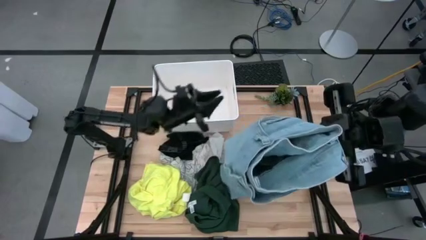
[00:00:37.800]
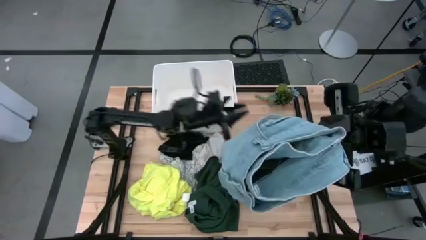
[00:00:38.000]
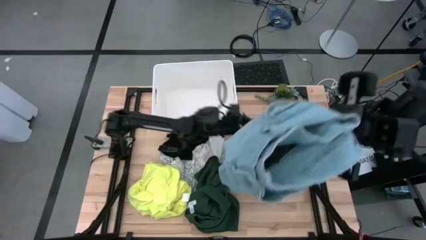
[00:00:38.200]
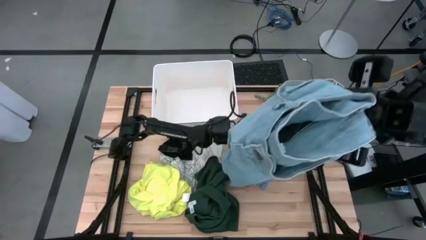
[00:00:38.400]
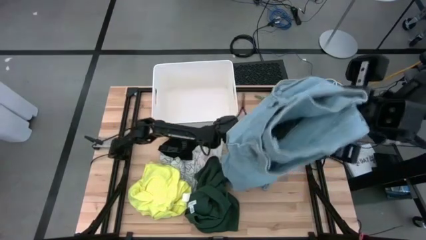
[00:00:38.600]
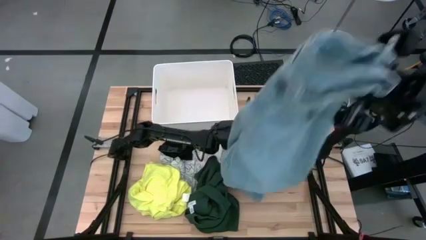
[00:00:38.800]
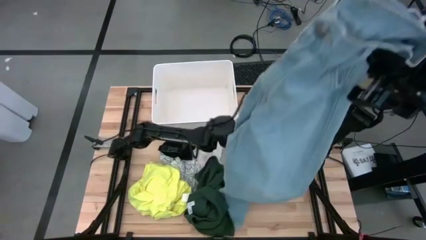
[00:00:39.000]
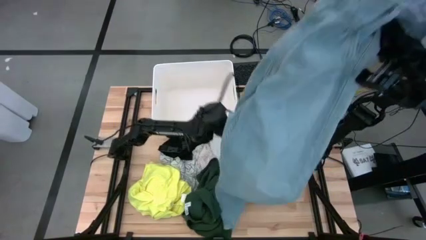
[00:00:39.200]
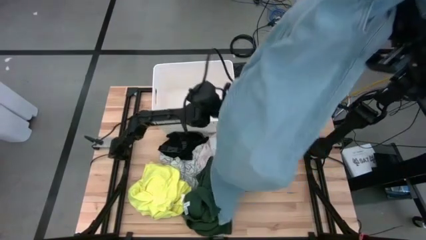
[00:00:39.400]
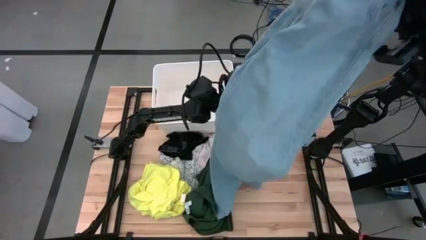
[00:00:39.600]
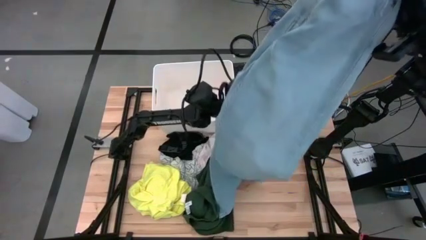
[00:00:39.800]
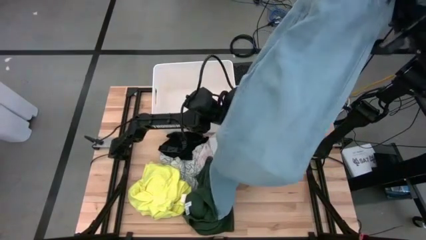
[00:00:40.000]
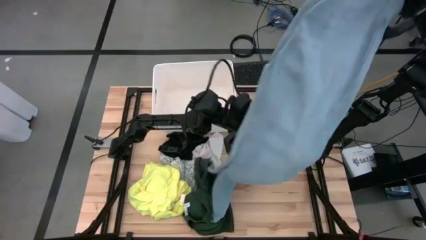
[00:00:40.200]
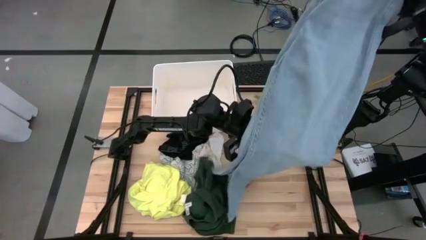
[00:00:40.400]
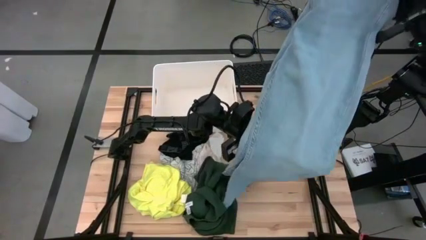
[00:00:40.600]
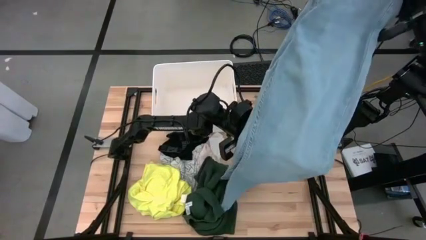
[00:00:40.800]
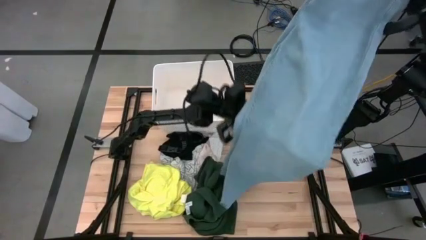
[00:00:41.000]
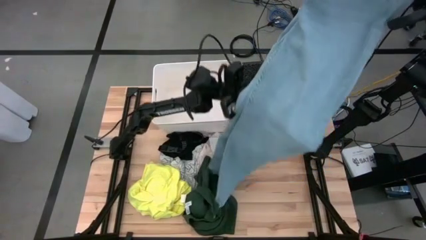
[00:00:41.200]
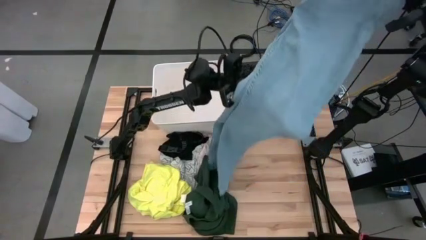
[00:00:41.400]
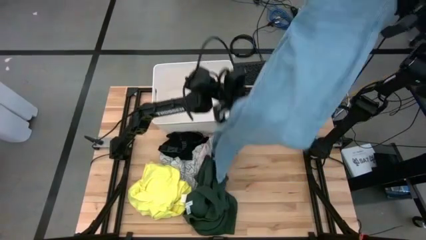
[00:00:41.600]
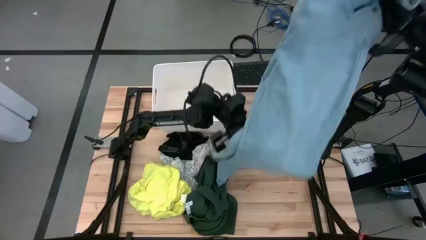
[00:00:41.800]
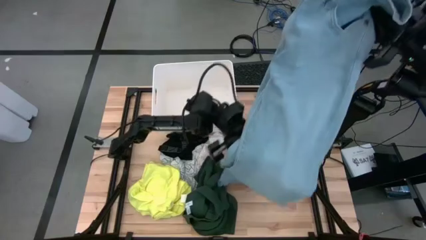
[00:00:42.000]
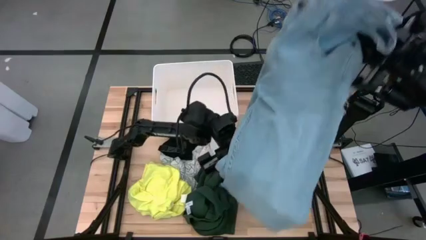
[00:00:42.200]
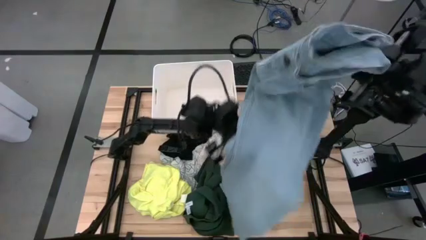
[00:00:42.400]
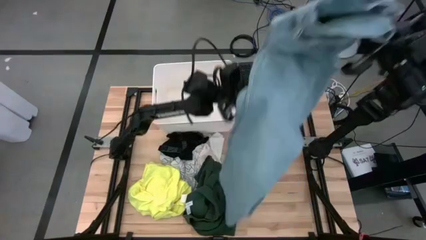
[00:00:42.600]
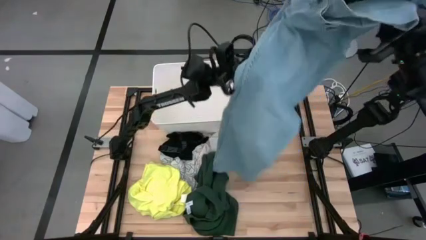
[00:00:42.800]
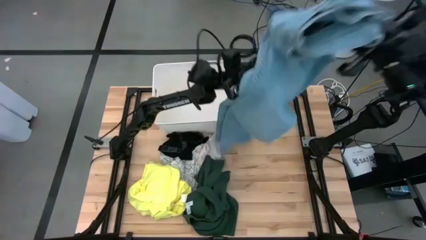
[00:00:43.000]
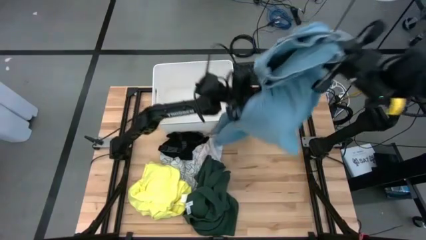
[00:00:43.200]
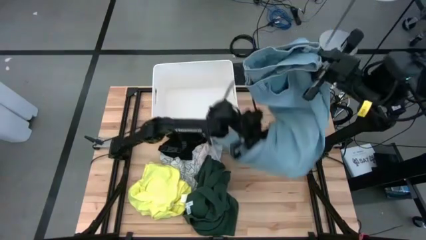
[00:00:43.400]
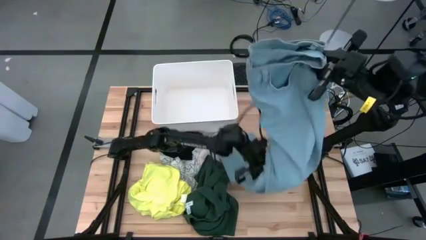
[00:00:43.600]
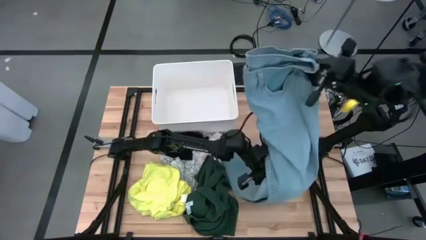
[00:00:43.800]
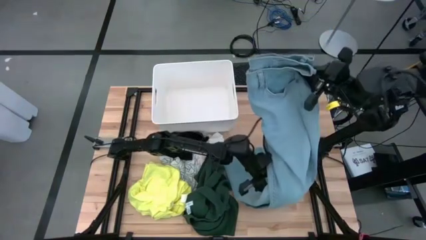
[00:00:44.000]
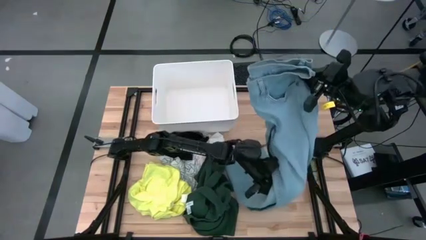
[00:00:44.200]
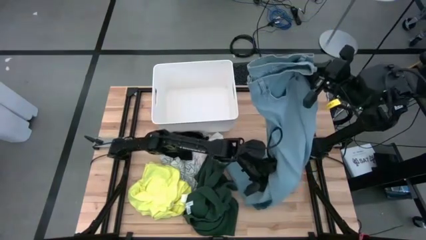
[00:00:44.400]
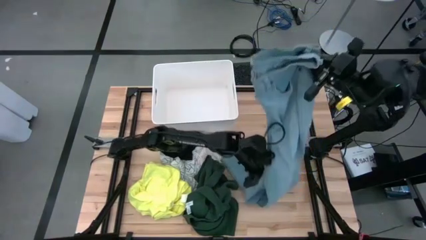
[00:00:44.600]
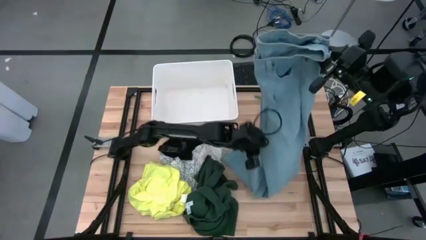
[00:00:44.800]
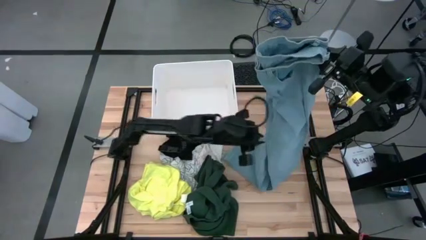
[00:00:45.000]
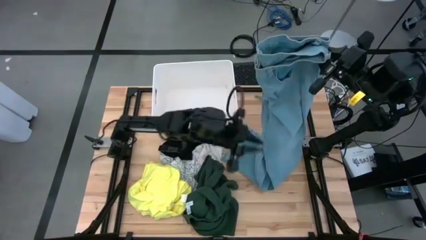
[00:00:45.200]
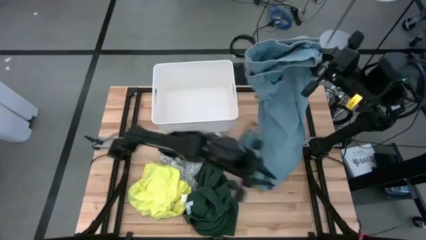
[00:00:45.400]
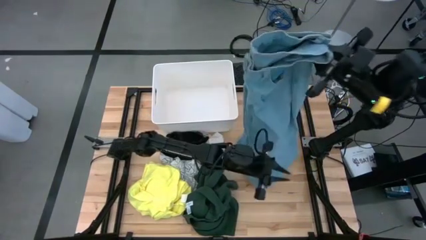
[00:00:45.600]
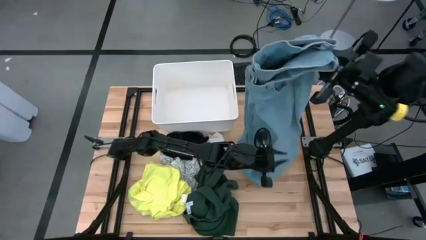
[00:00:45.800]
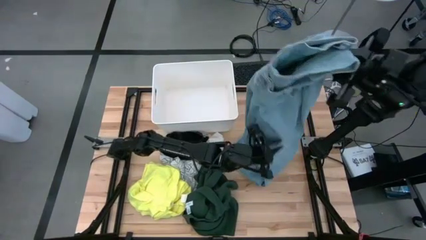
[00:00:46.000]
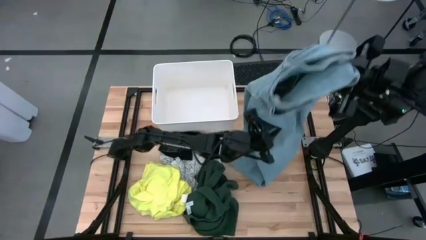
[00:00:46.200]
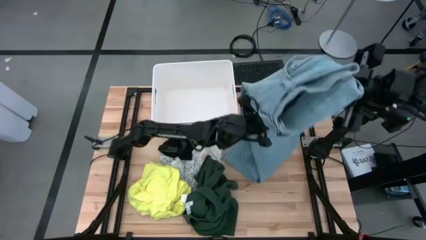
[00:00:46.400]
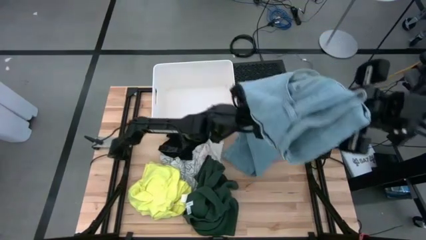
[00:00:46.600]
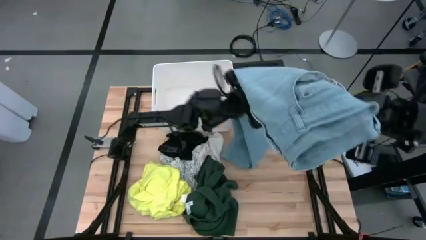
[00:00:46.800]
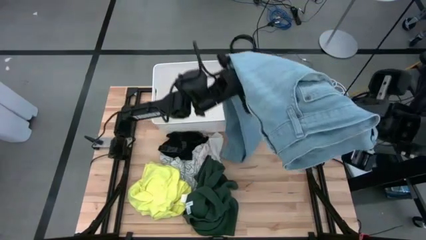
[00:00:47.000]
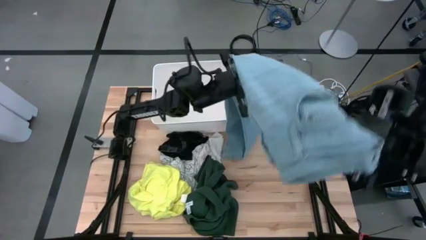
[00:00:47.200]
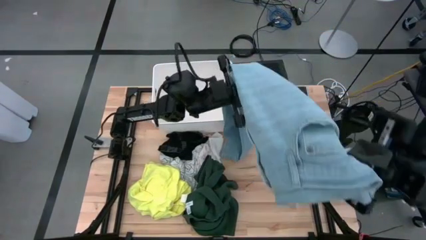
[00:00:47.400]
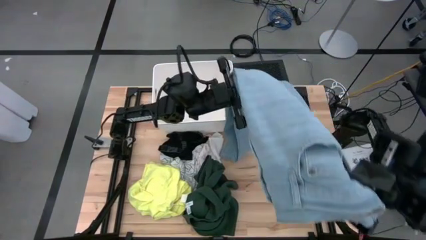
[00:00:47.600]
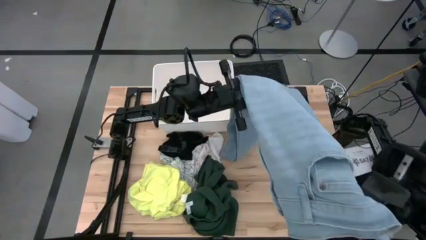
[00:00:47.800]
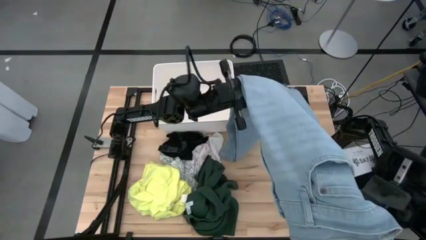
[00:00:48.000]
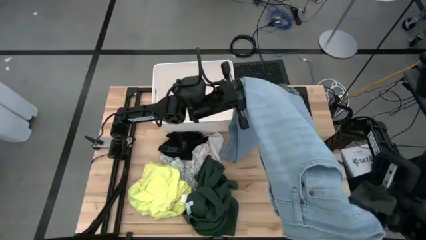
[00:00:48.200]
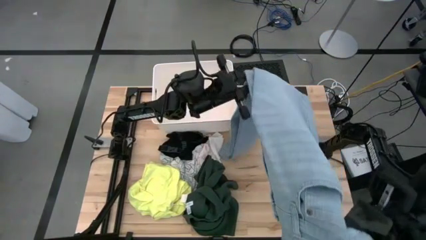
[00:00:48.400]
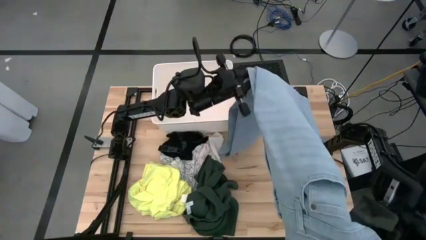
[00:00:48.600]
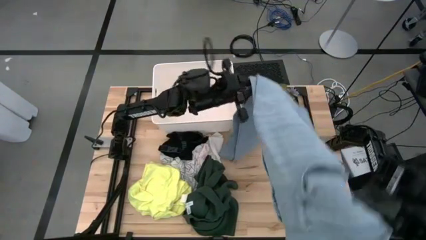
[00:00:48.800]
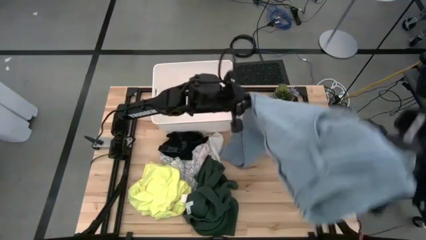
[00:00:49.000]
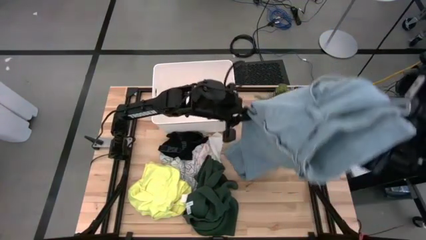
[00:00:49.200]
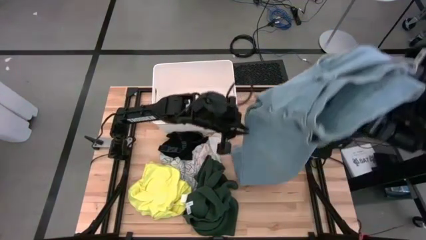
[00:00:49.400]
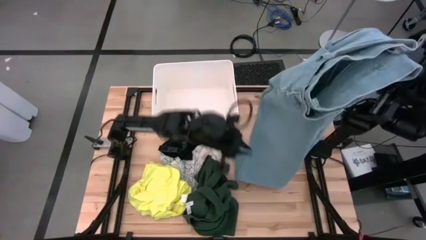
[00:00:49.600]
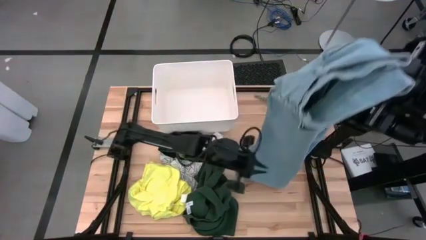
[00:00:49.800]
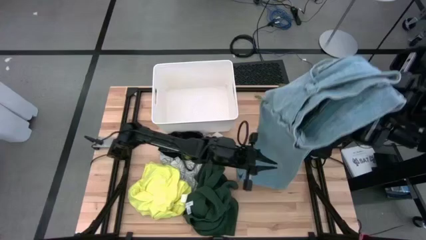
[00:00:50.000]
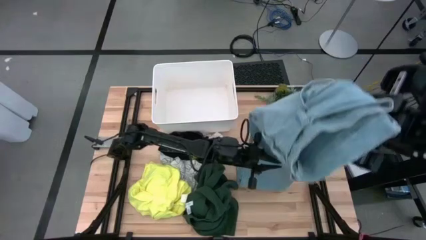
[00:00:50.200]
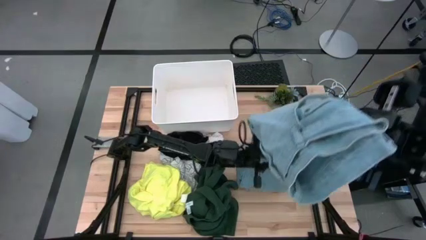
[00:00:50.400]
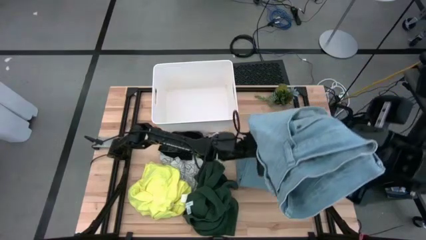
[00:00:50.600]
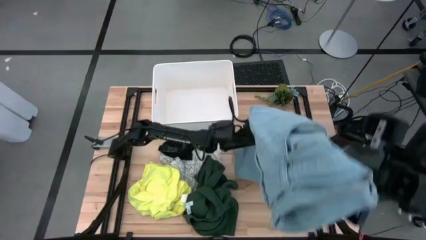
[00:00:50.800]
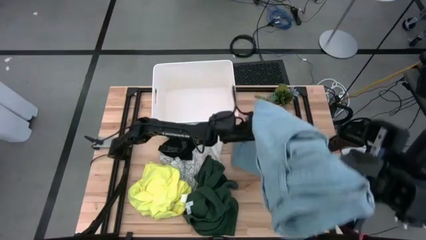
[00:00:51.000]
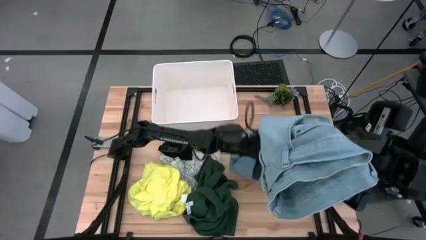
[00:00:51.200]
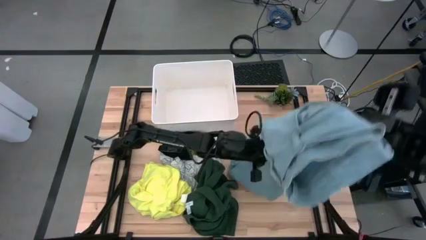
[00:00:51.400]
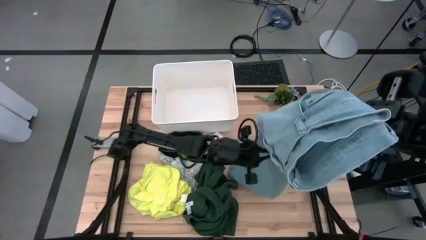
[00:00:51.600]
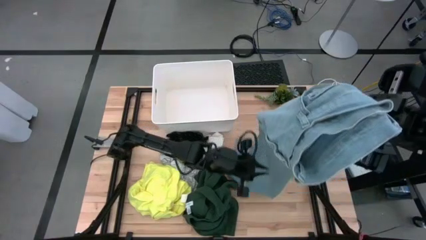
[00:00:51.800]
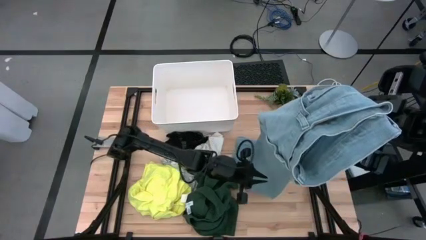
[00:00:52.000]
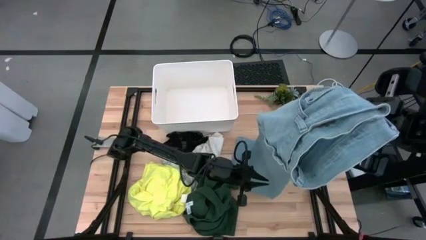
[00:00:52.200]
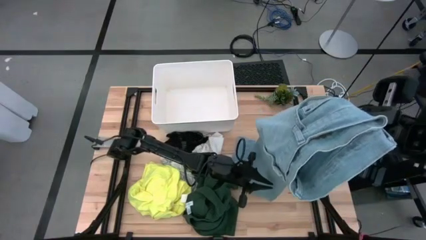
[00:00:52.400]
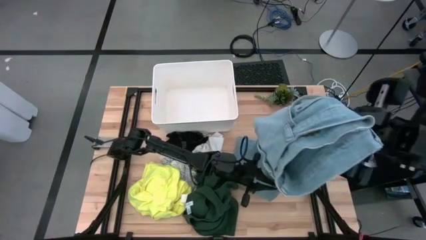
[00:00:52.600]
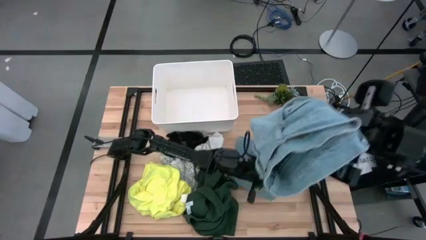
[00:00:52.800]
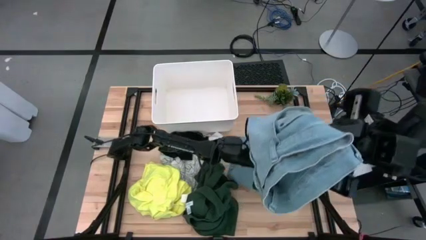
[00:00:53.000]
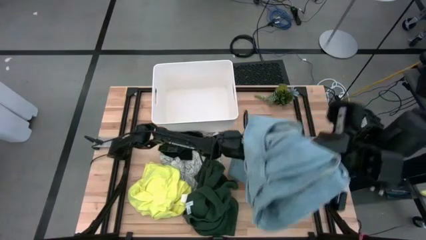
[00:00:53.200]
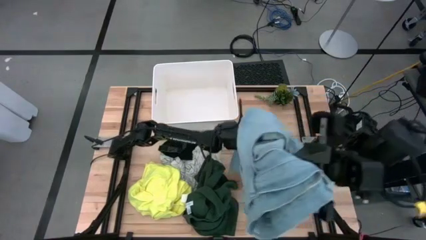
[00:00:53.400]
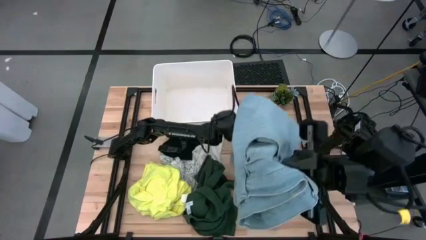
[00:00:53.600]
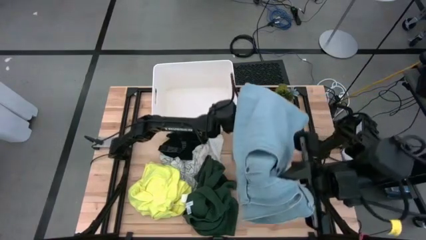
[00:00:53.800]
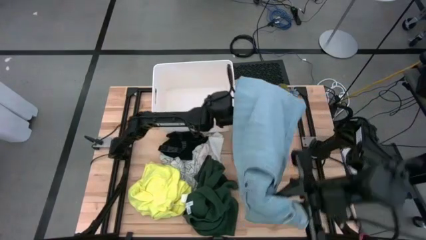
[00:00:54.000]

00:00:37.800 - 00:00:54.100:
Task: Fold laundry
Fold the denim pants
